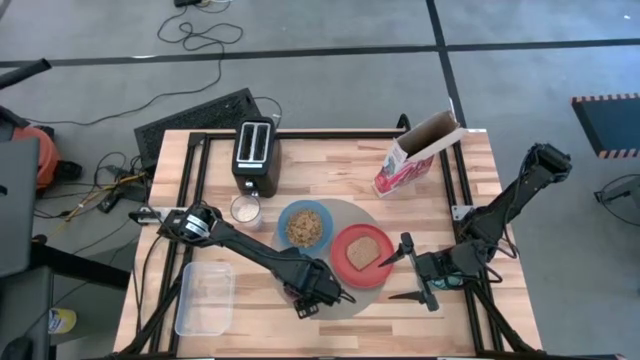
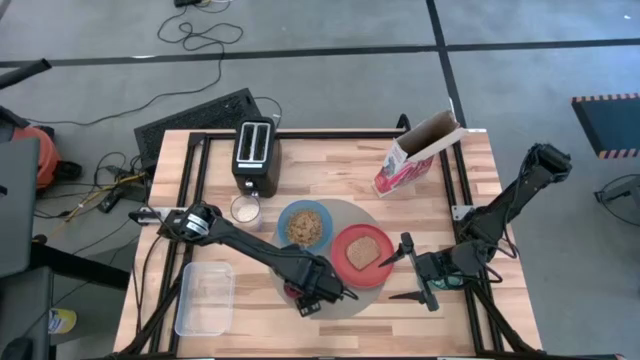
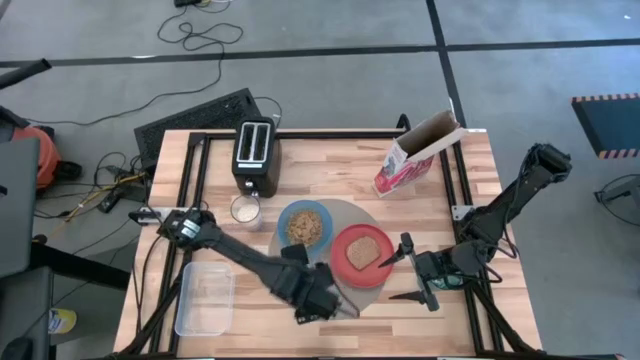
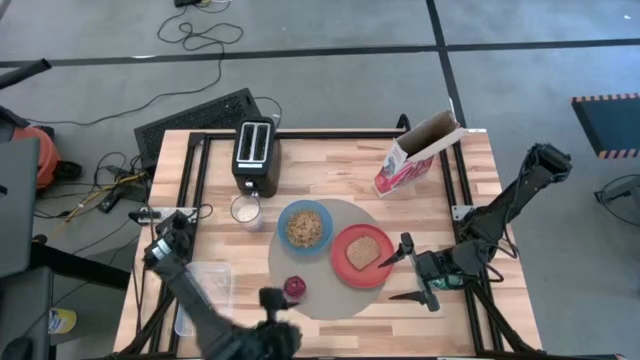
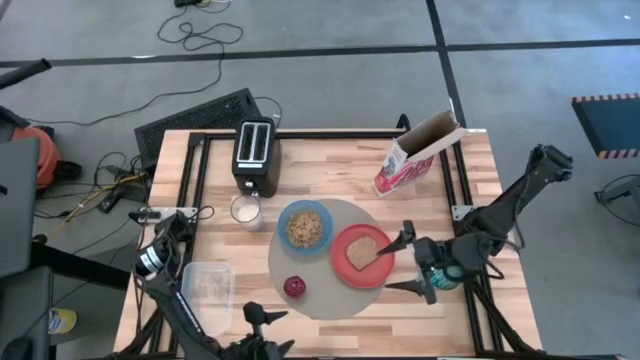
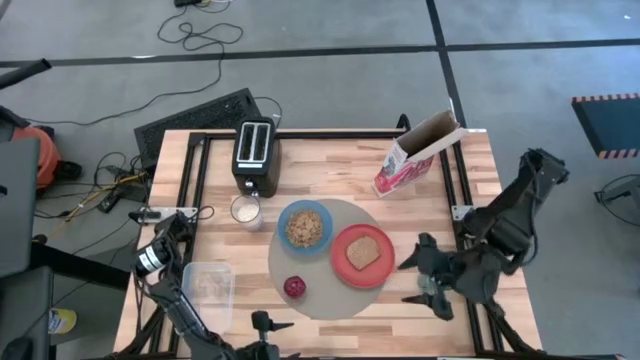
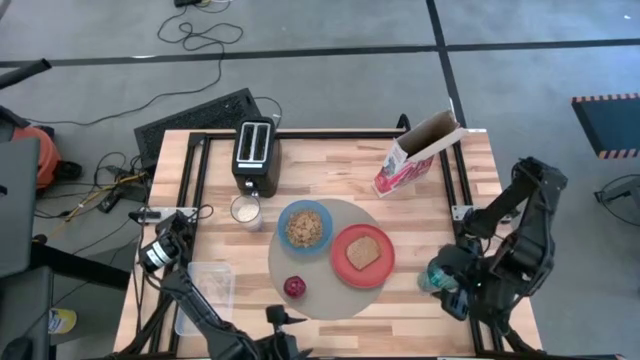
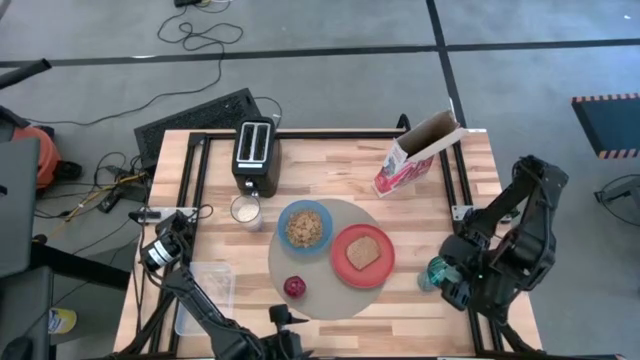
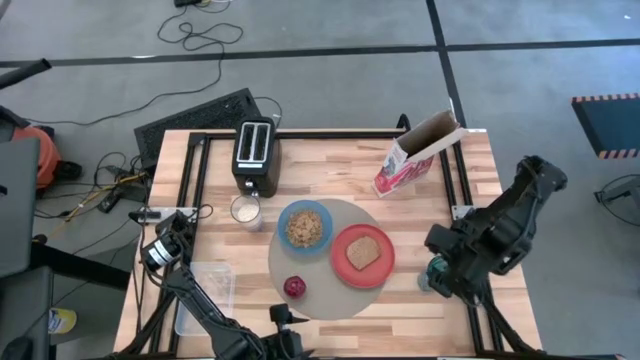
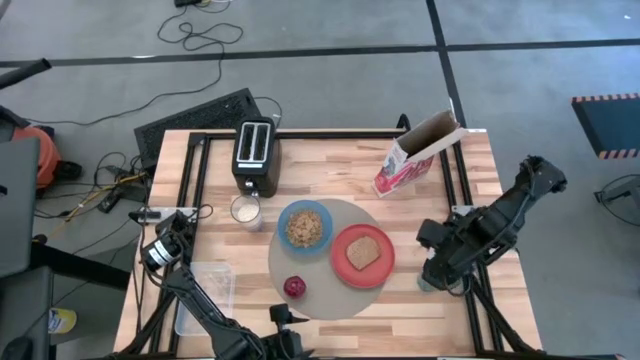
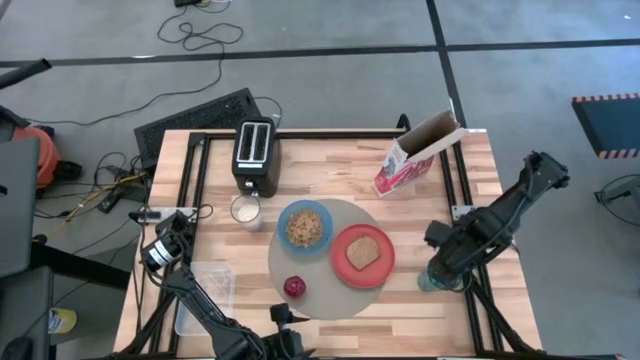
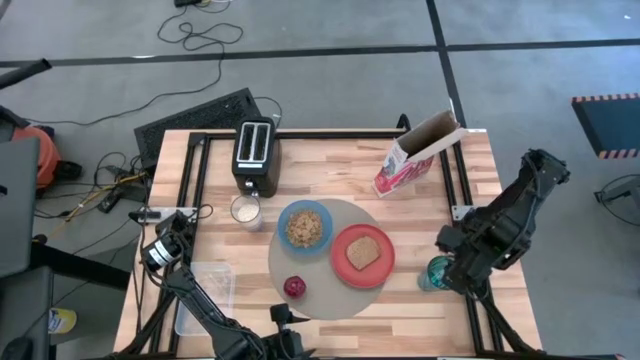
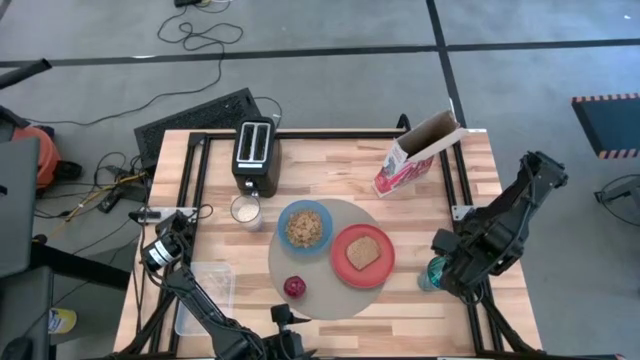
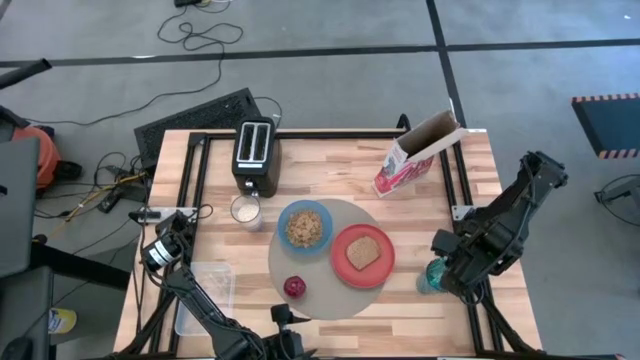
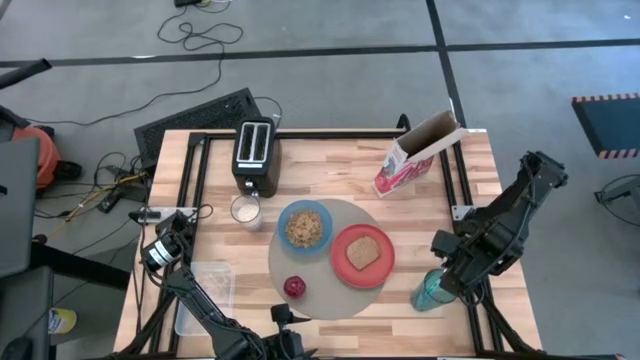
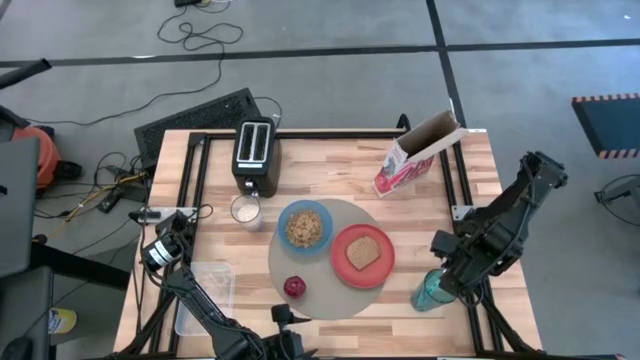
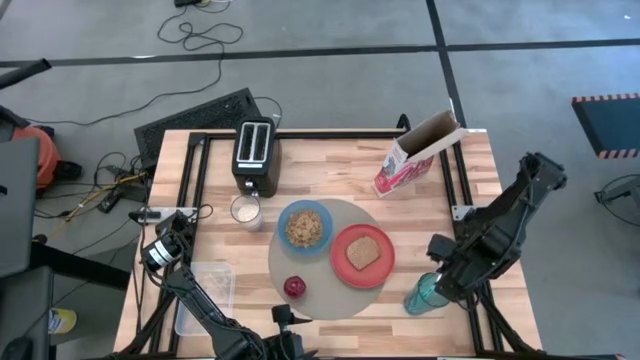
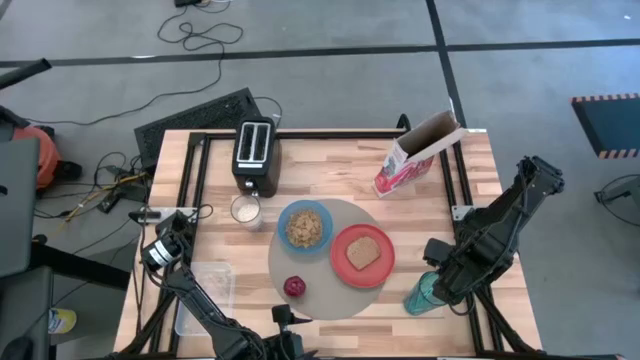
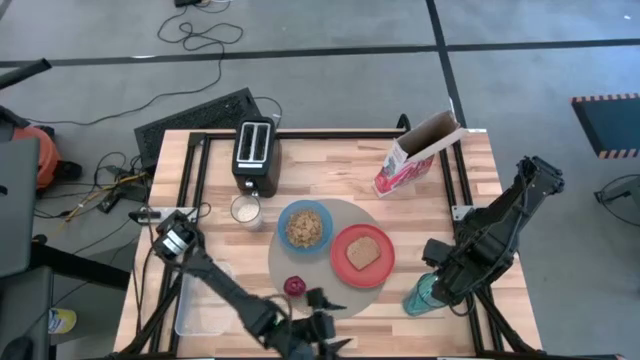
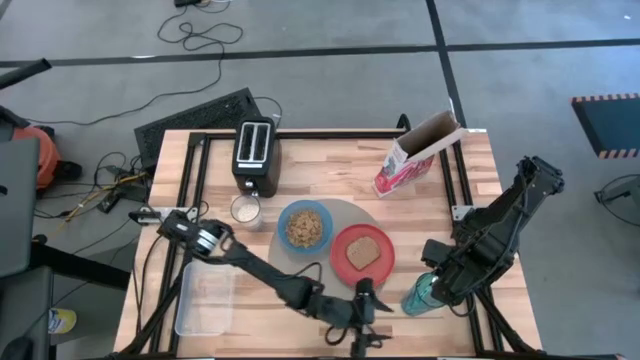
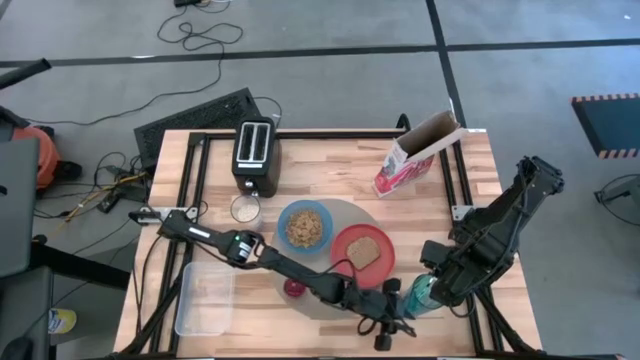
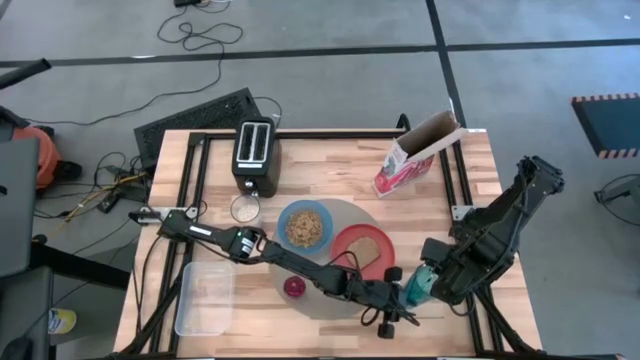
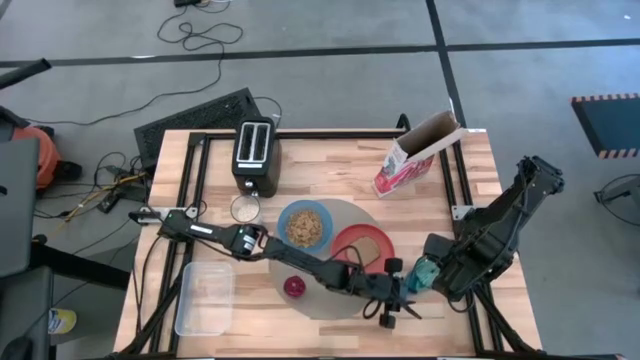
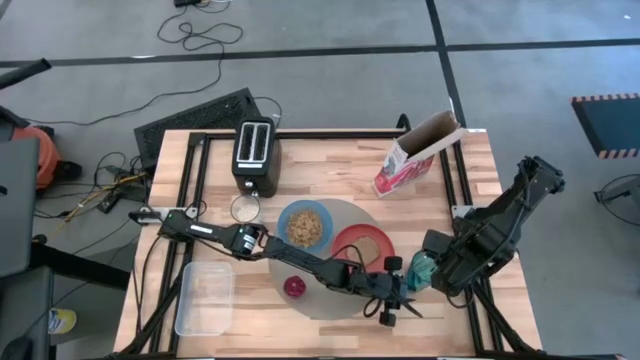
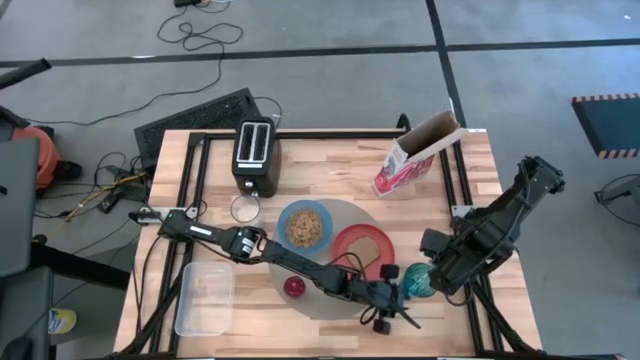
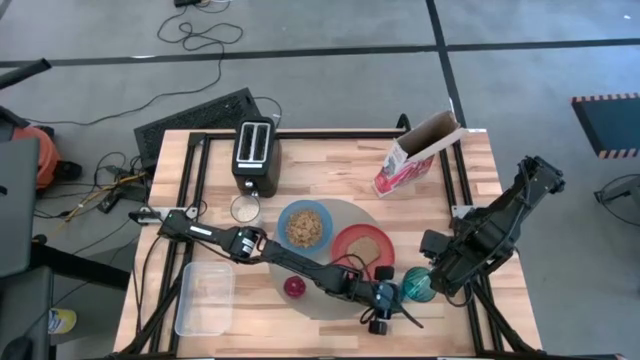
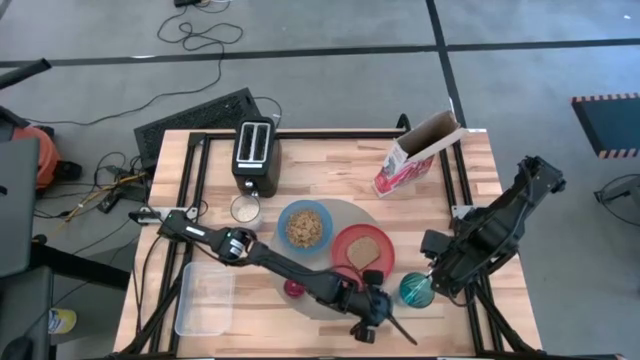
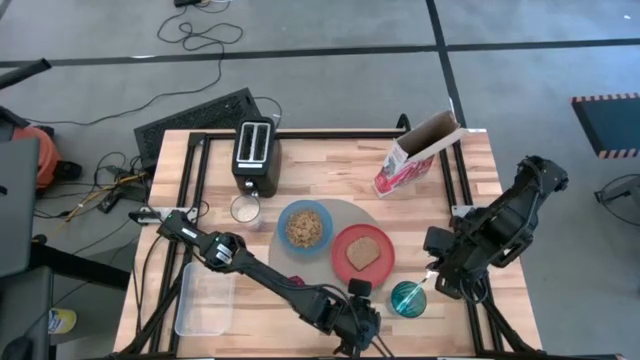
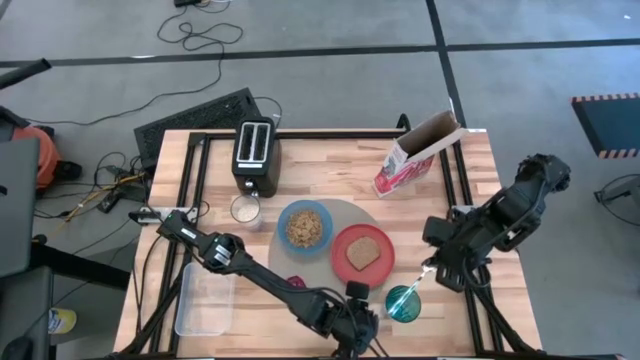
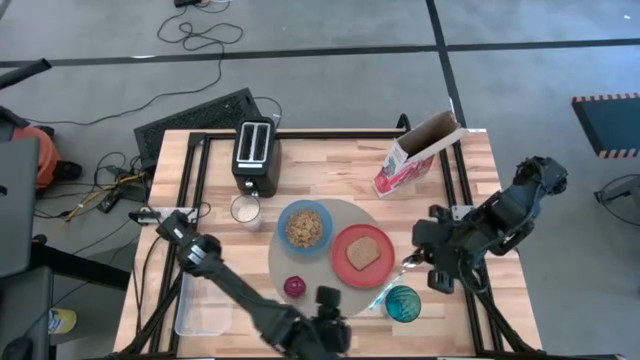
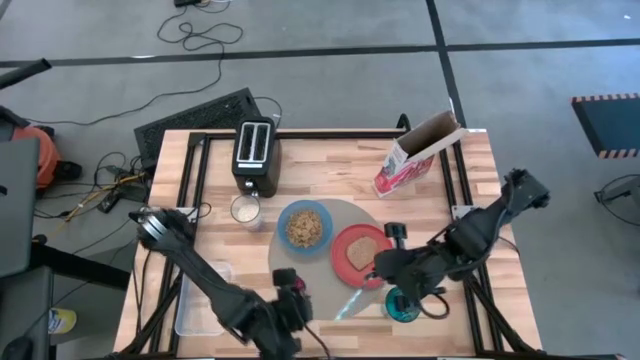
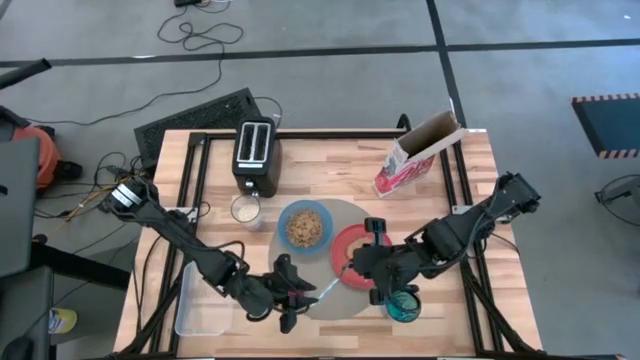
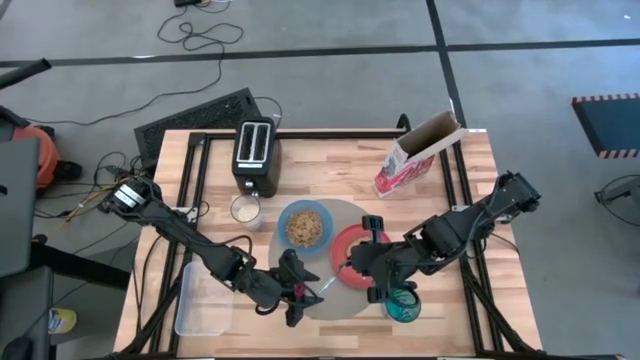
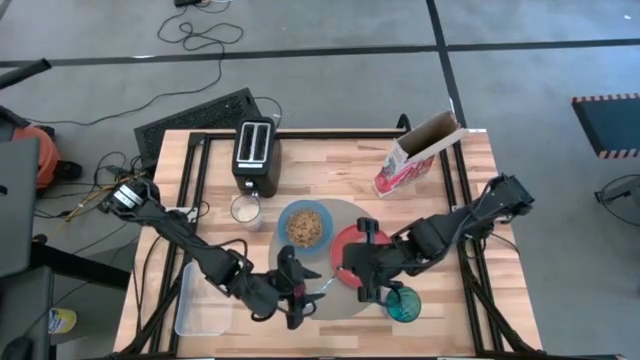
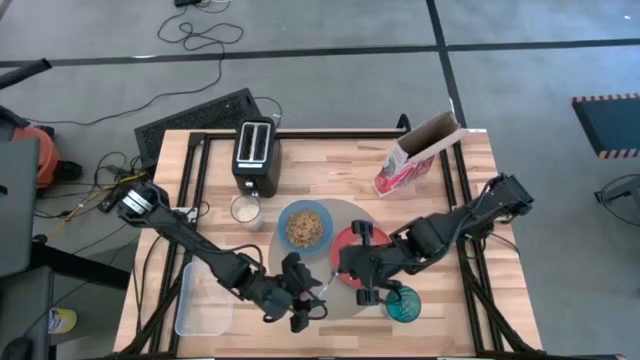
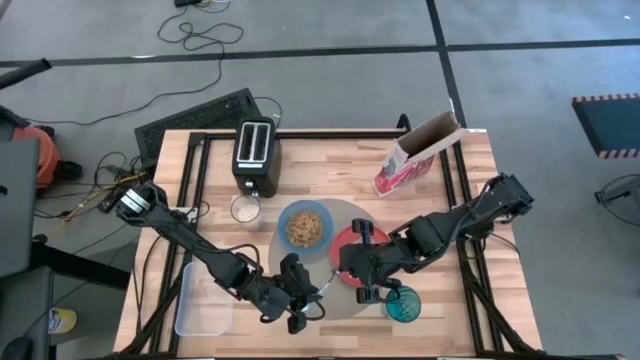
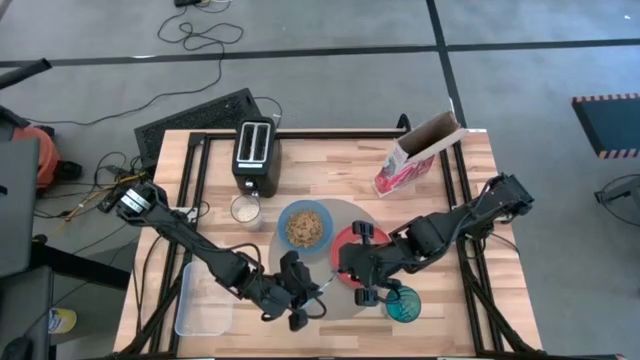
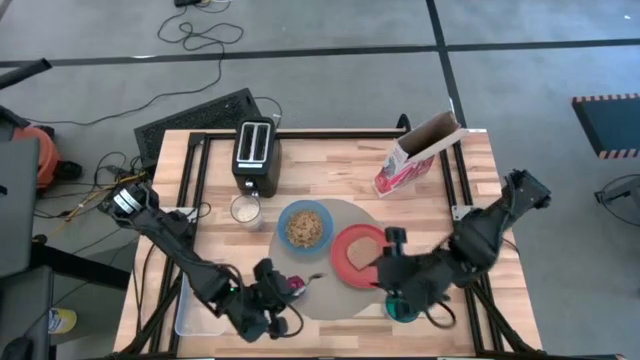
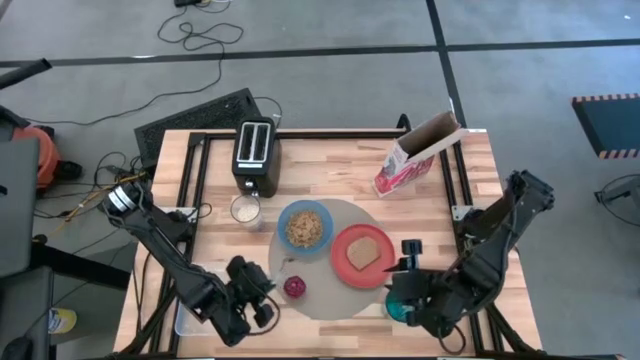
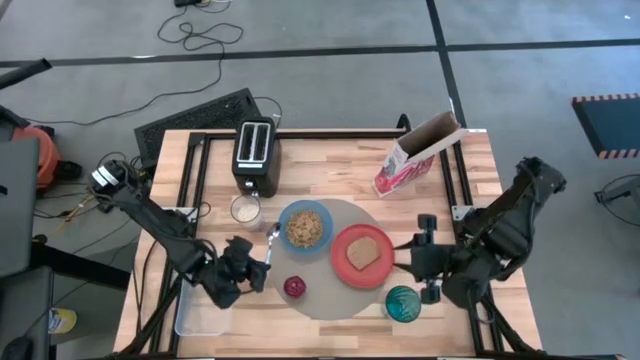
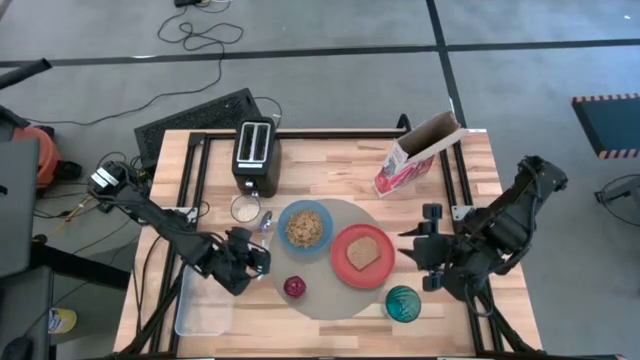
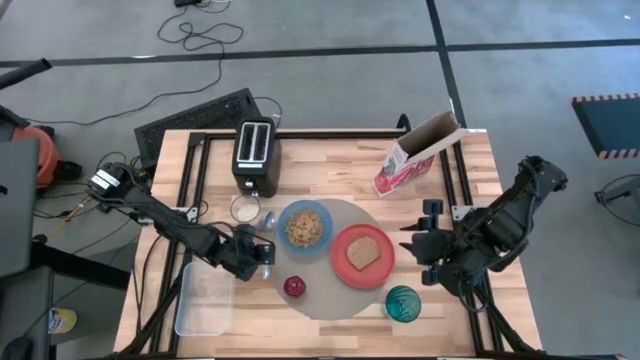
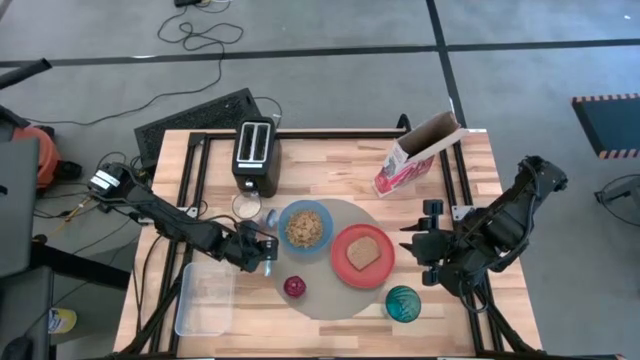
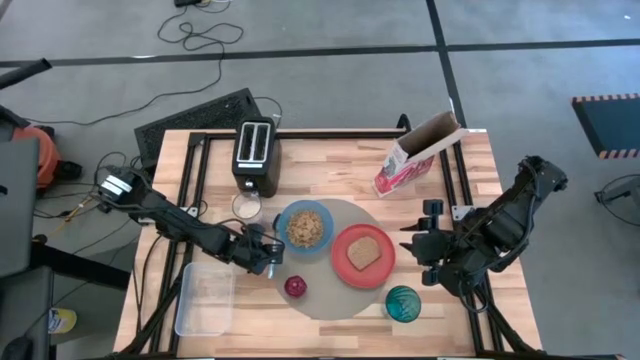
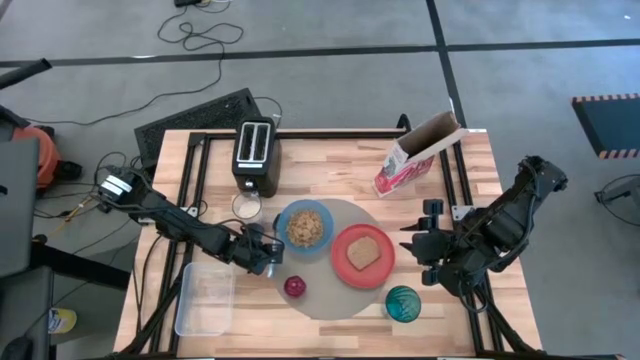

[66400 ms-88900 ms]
Task: Arrange a breakfast setting
Put the blue spoon on the gray placemat to the left of the blue bowl
